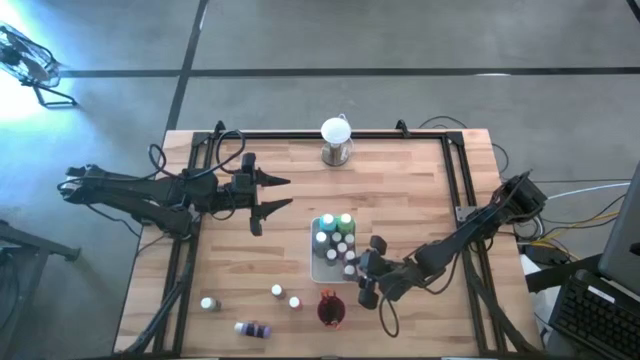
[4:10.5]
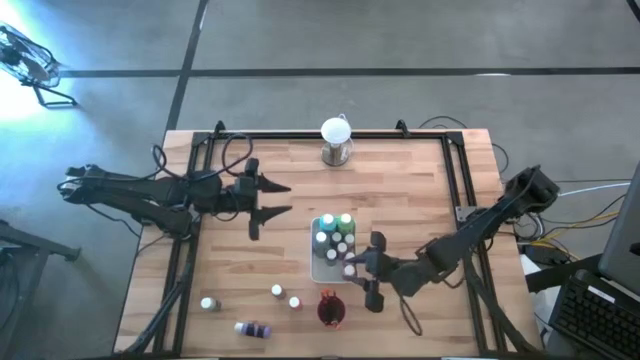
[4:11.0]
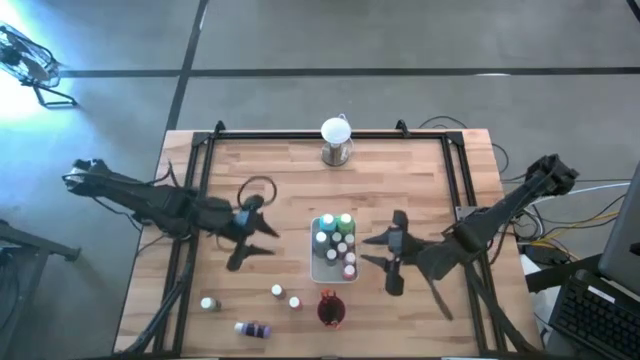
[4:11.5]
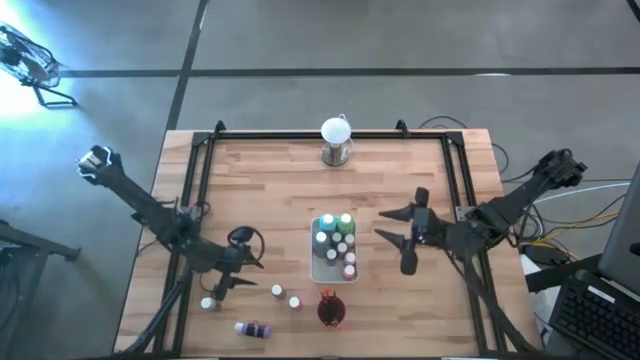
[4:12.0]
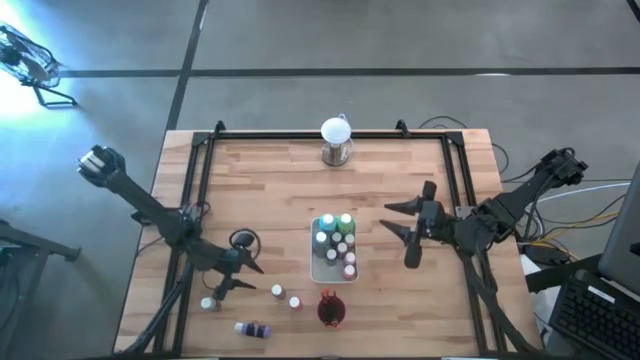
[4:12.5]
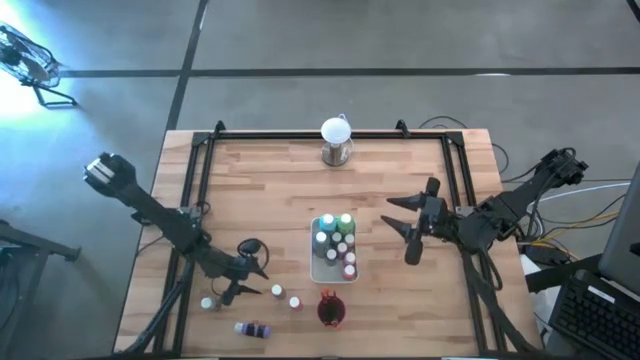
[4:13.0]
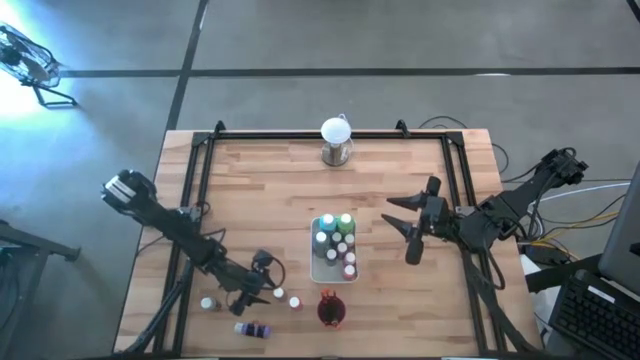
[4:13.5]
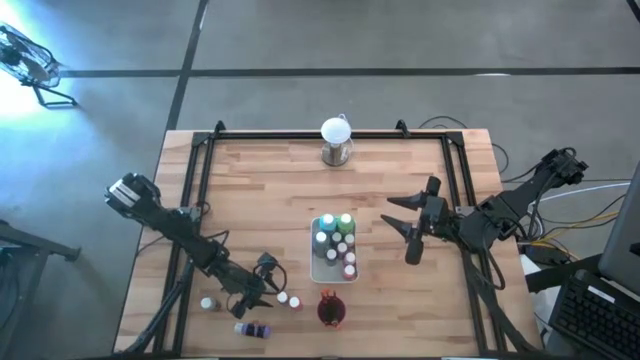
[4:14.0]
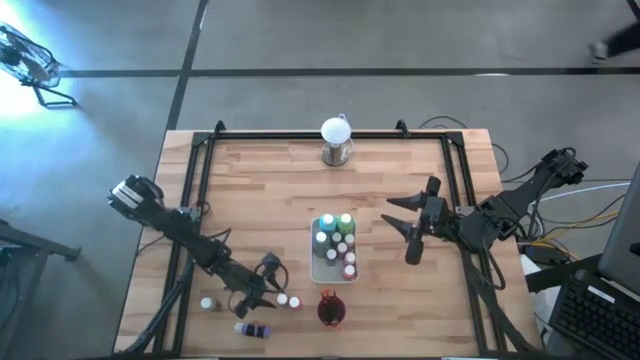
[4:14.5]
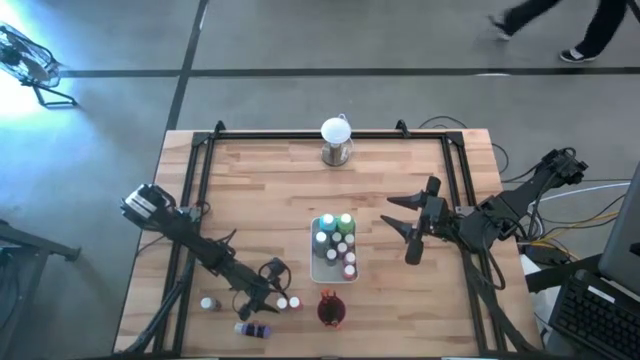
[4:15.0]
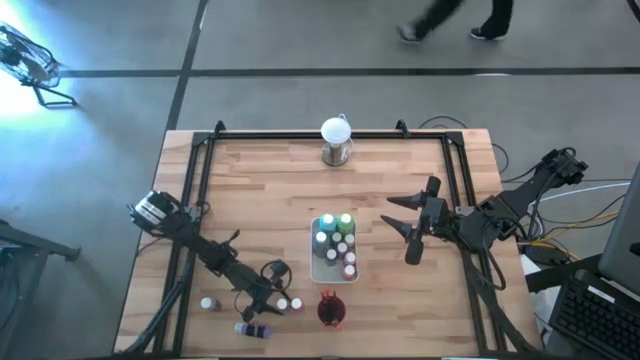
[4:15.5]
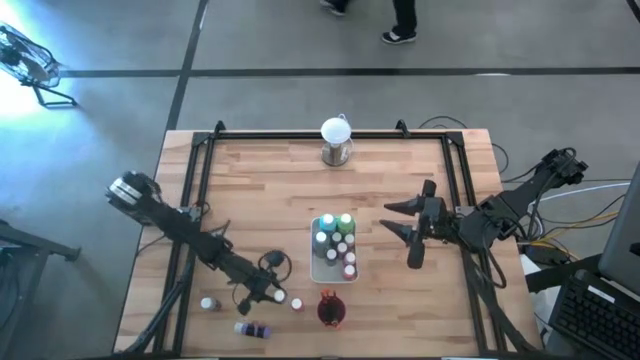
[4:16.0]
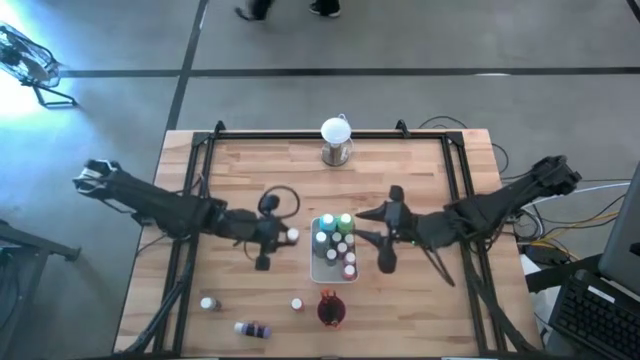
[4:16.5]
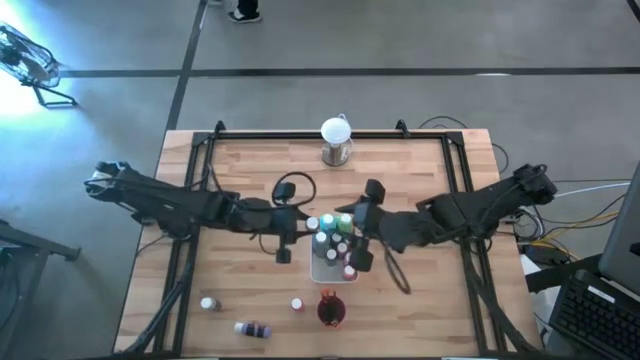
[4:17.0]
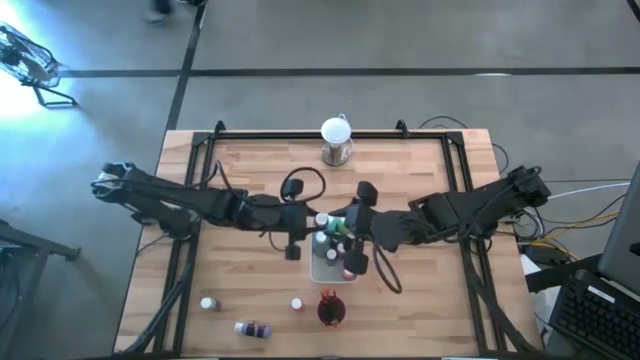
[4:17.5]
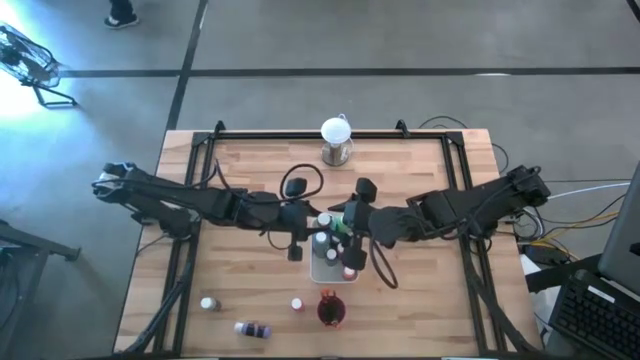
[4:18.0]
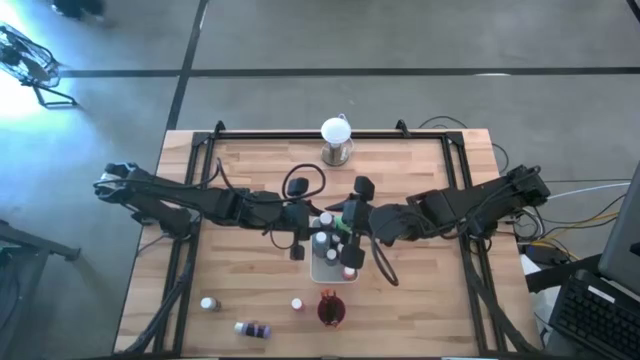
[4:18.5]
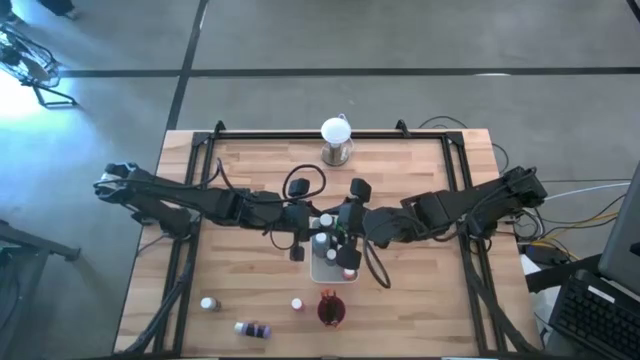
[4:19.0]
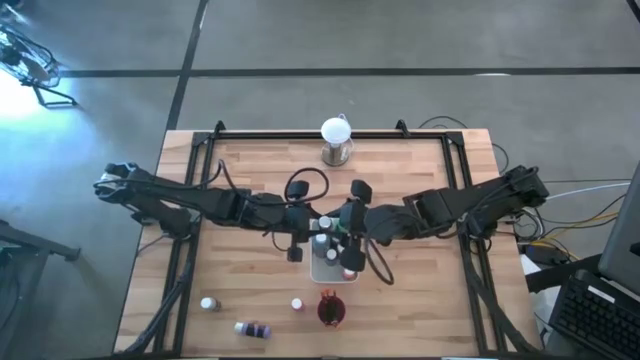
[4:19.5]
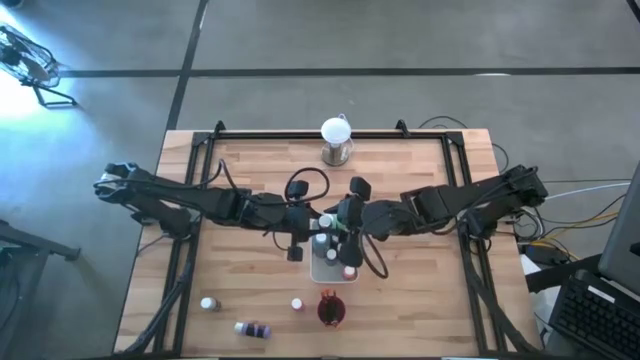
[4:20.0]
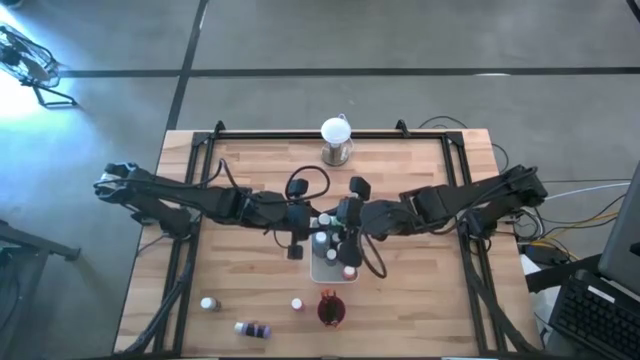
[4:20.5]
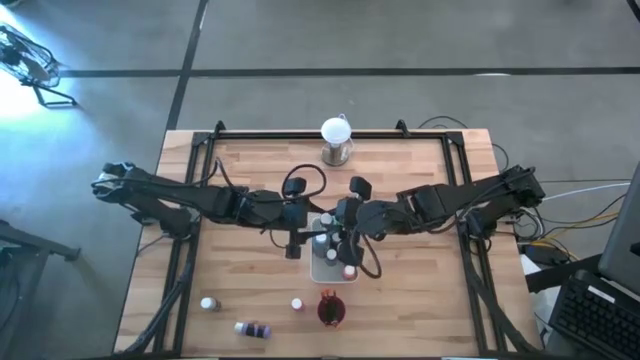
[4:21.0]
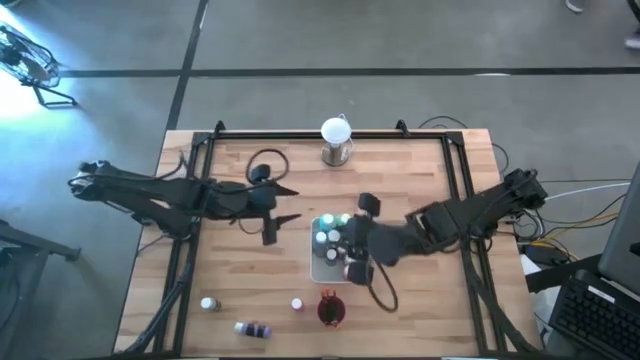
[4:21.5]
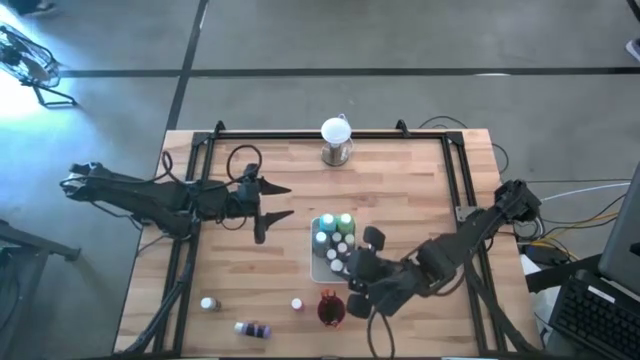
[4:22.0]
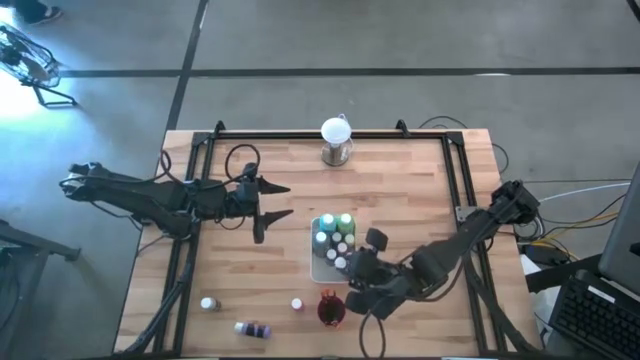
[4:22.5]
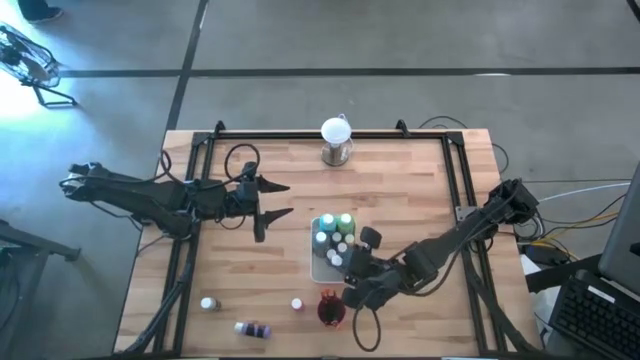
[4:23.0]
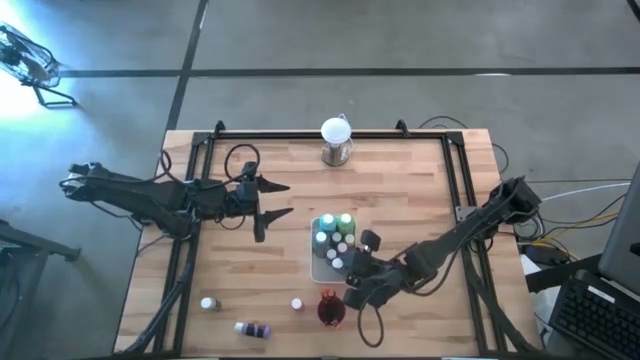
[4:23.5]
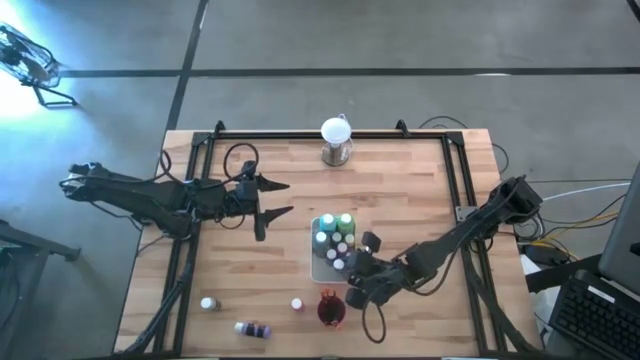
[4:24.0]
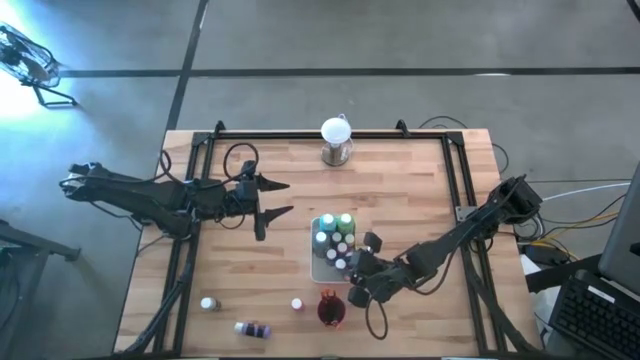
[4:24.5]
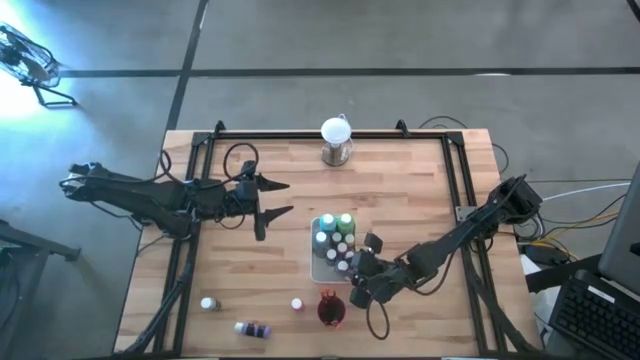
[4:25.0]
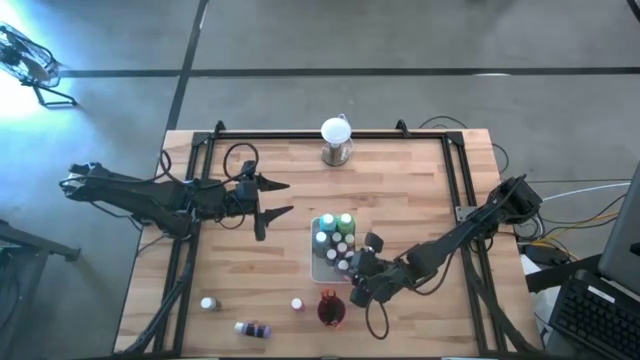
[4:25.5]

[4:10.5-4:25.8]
Task: Pick & Place Paint Supplies
Put the brown paint bottle into the white bin
